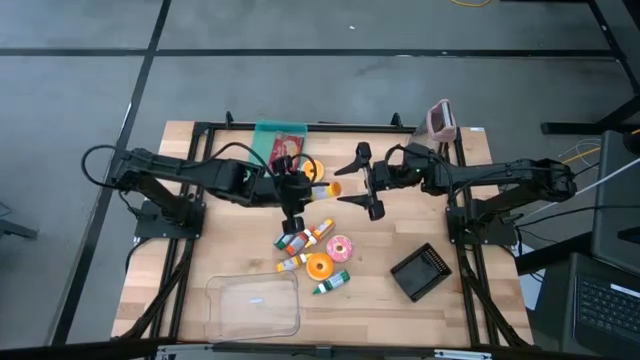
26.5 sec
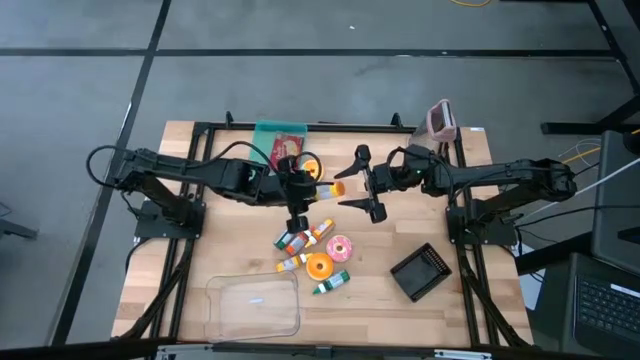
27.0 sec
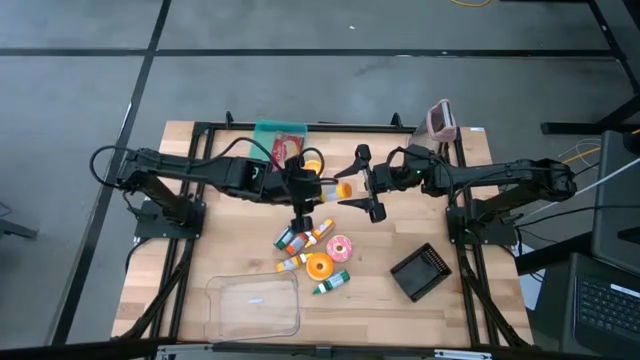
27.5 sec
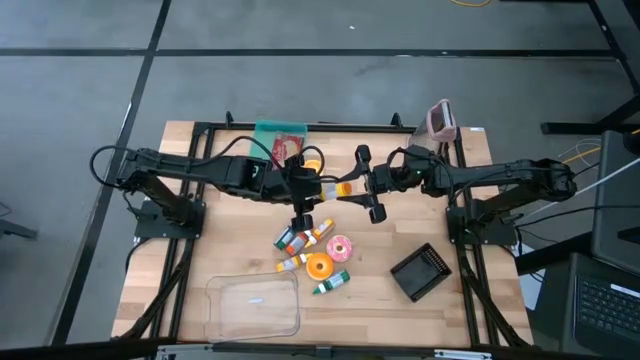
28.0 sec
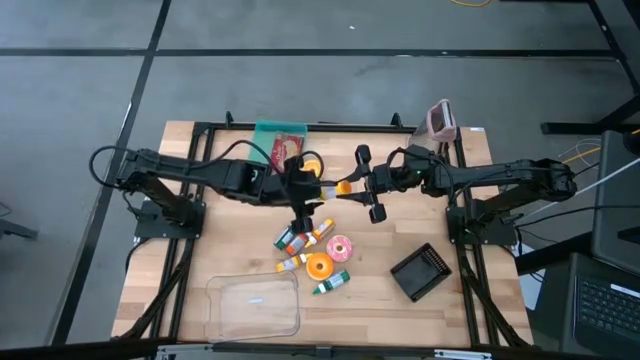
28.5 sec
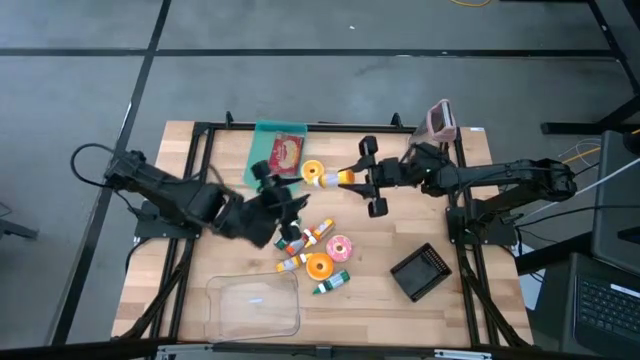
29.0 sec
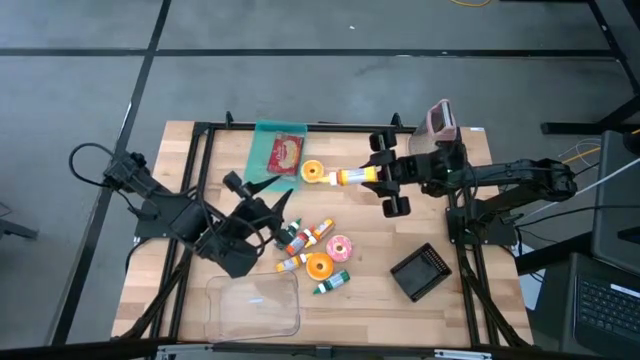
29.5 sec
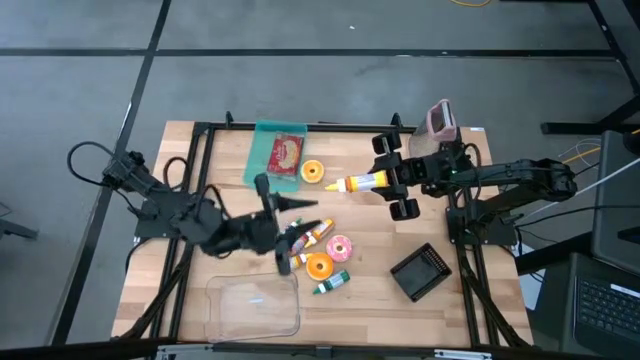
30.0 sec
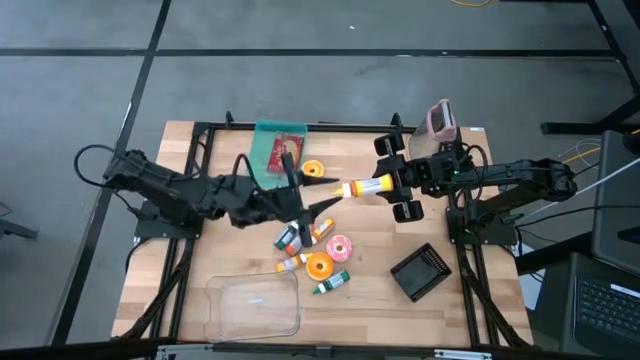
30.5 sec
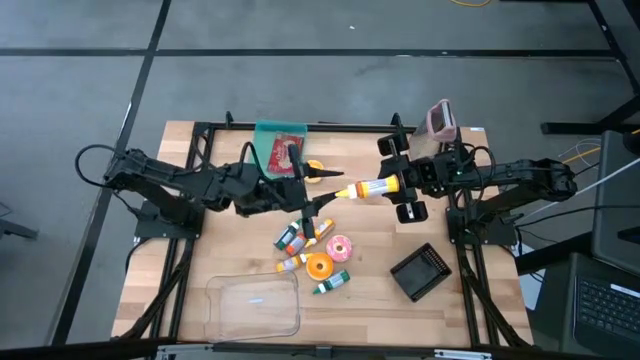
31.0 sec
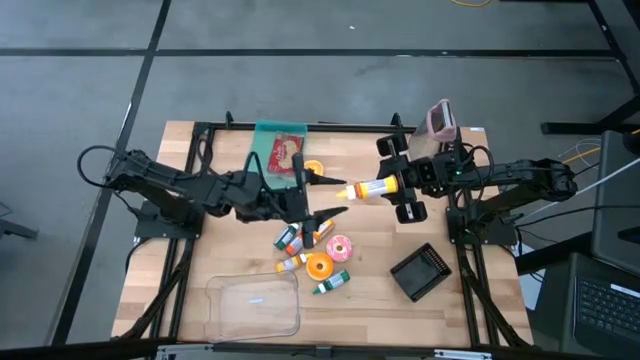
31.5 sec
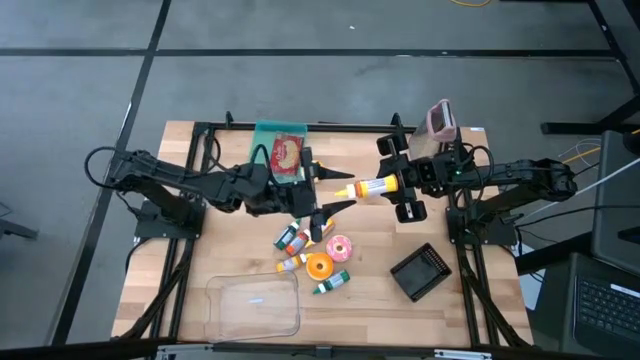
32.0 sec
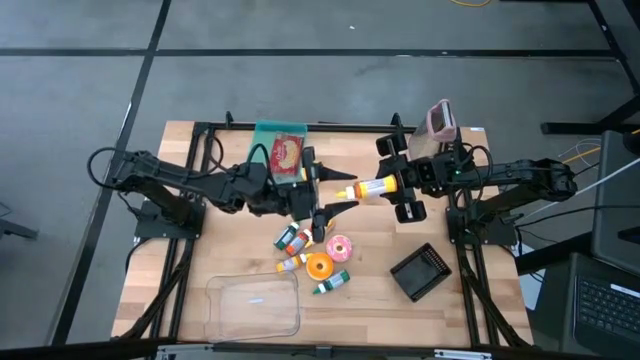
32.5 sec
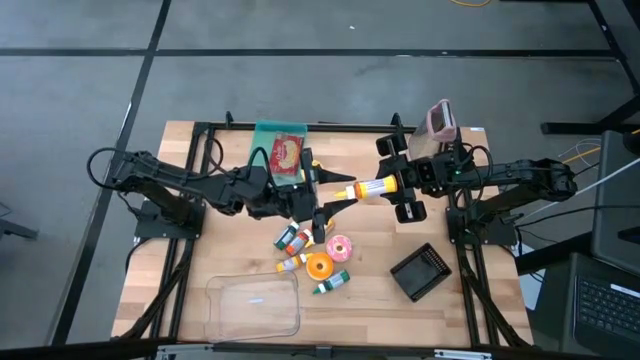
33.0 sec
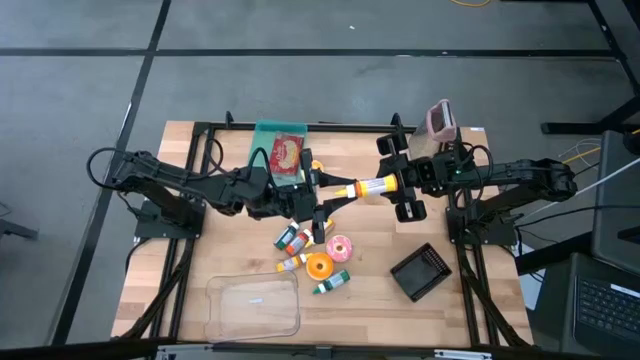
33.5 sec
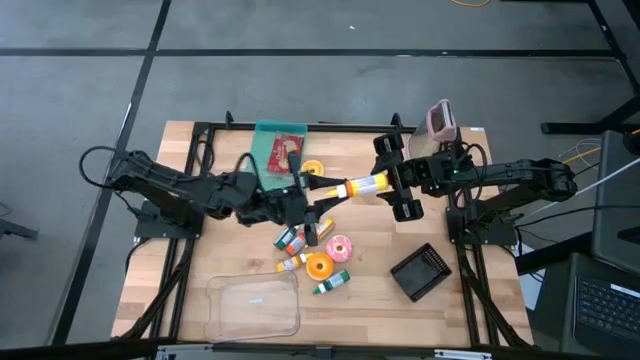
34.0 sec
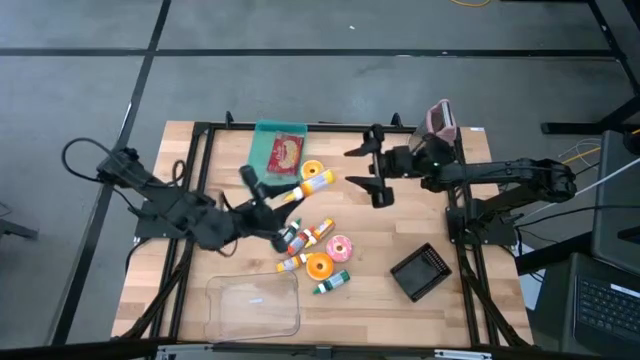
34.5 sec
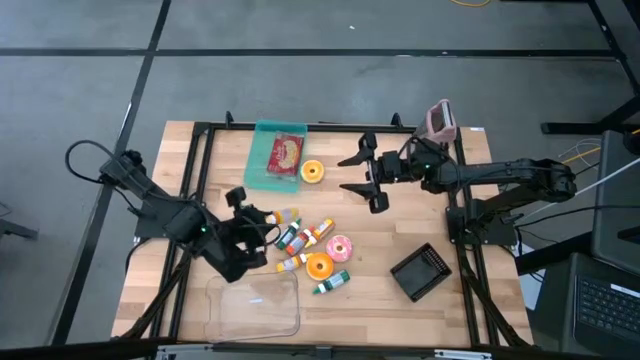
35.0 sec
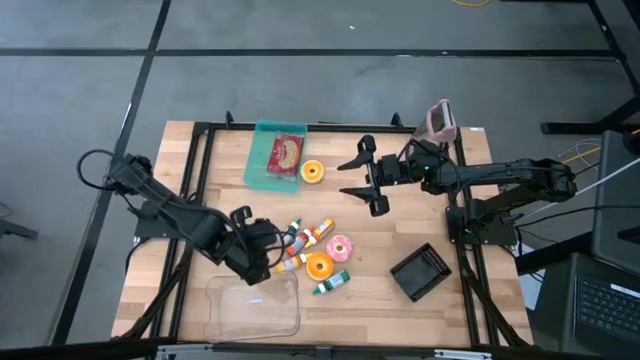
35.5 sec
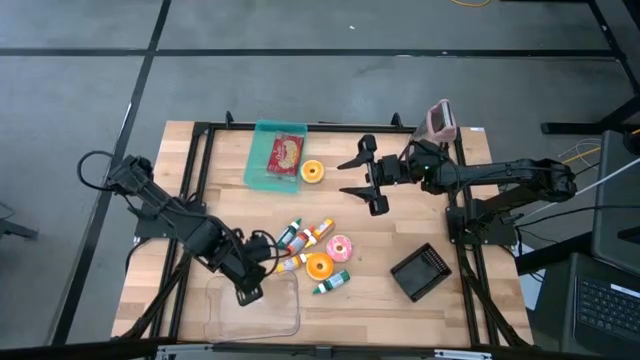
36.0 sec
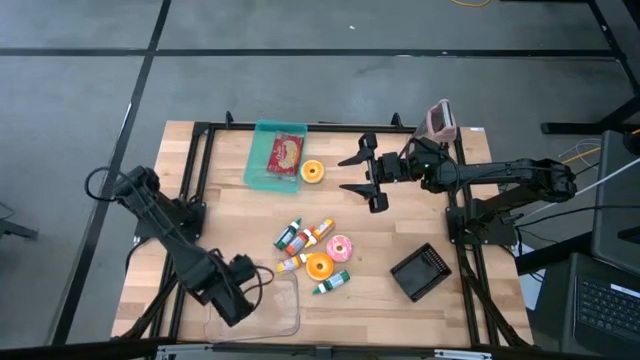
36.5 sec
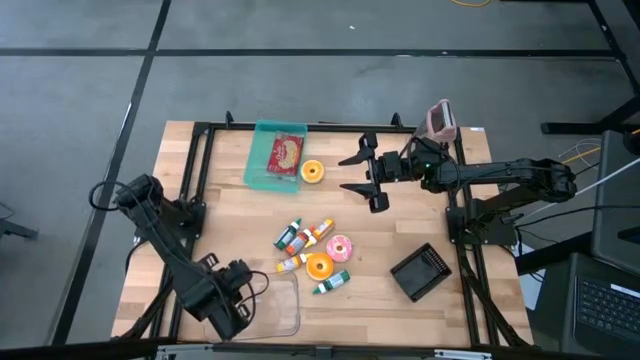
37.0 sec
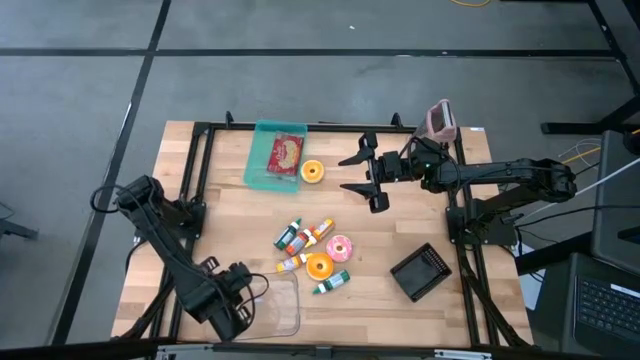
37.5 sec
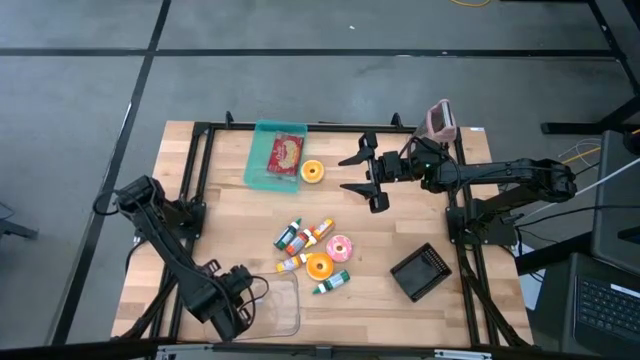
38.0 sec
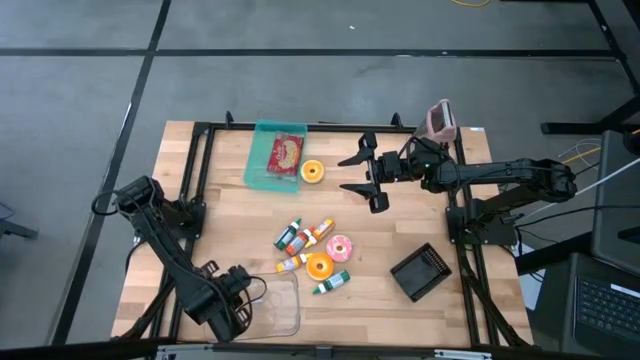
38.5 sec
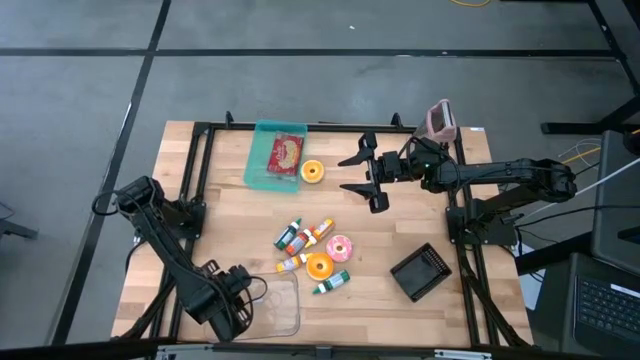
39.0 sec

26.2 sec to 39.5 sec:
Put the top left yellow food coloring bottle into the transparent bin

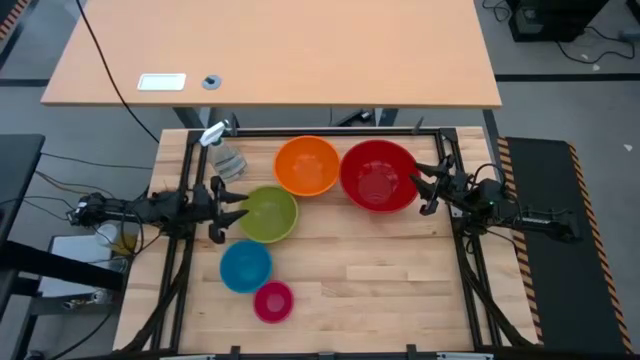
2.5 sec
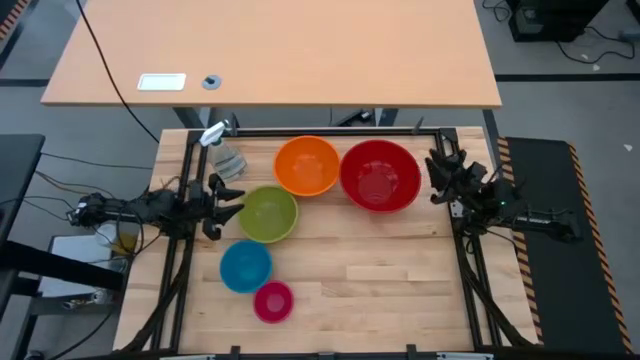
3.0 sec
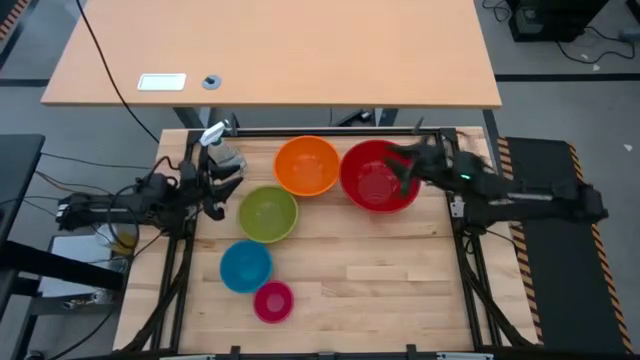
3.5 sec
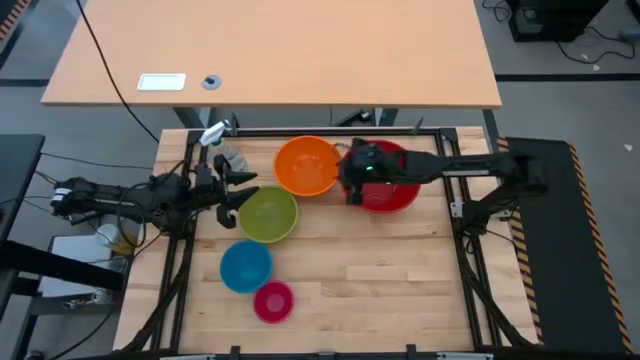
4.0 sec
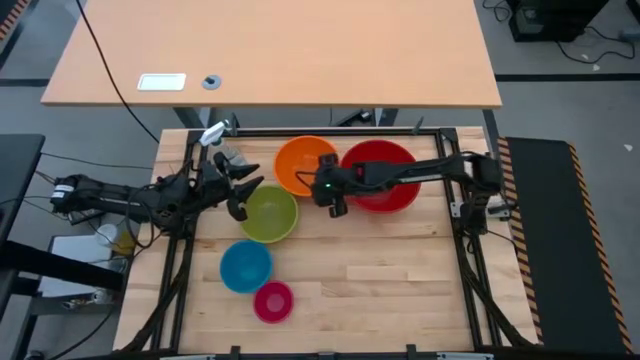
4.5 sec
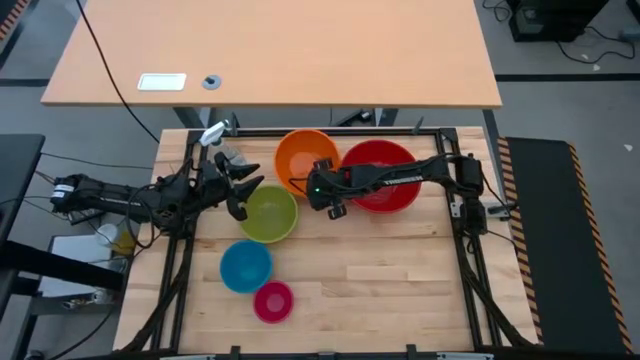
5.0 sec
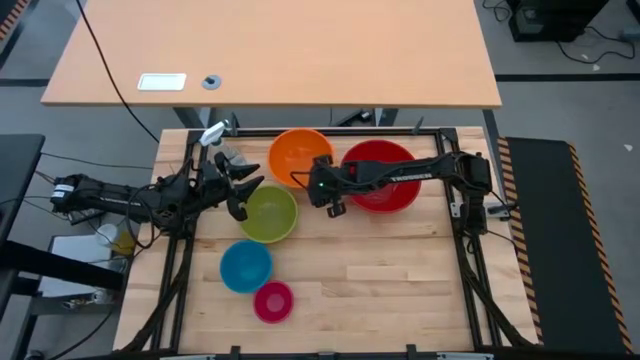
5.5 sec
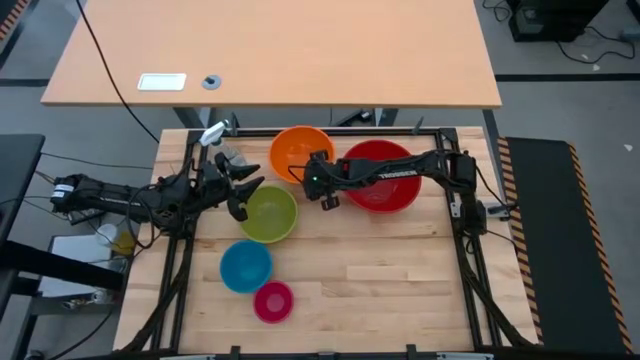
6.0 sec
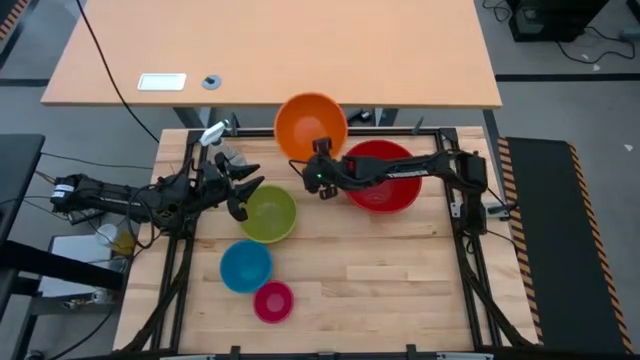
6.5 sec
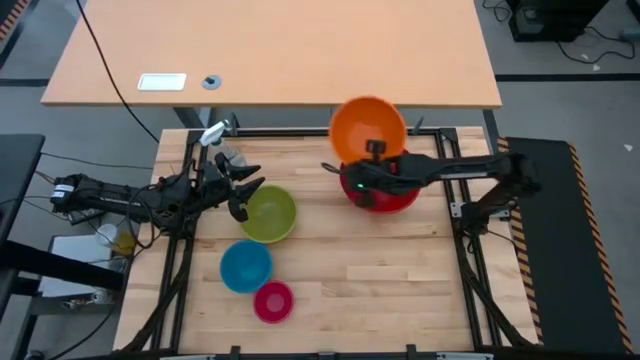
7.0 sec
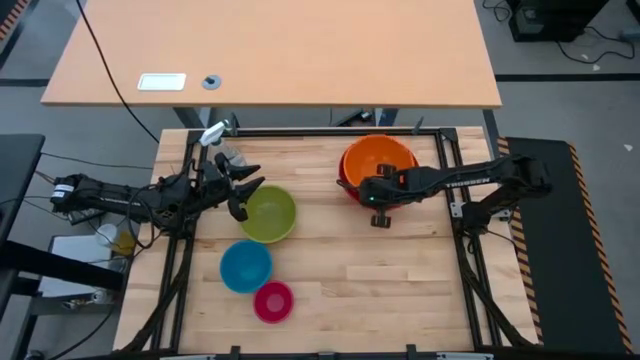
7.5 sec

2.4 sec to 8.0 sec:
Stack the orange bowl on top of the red bowl

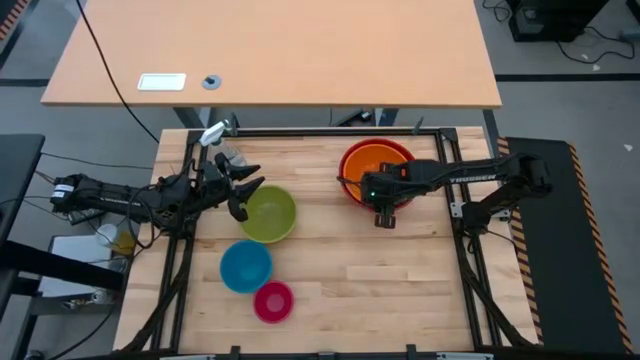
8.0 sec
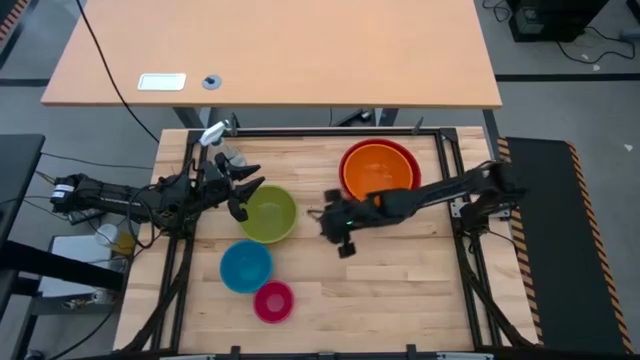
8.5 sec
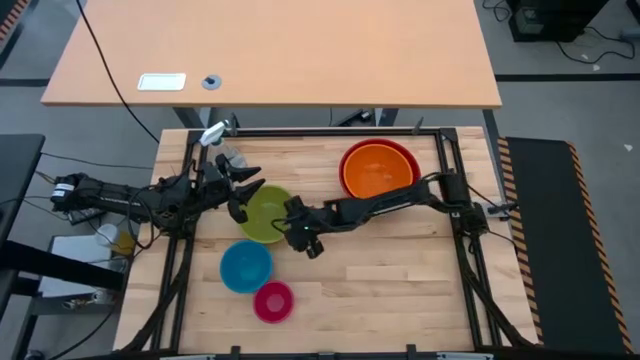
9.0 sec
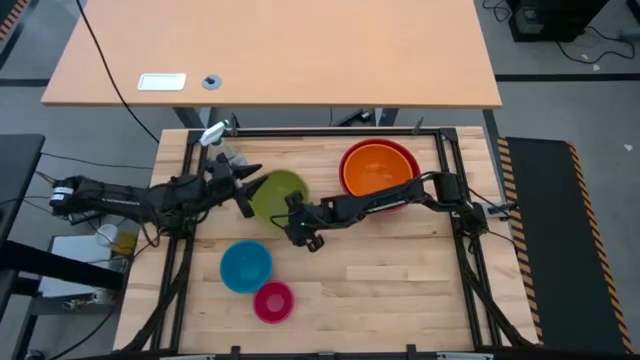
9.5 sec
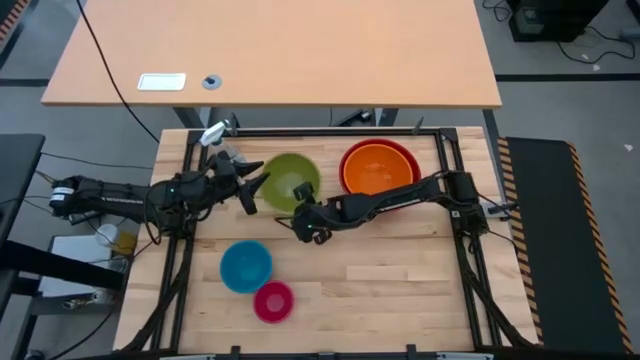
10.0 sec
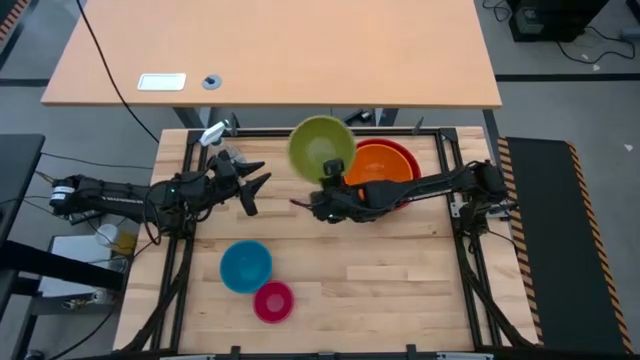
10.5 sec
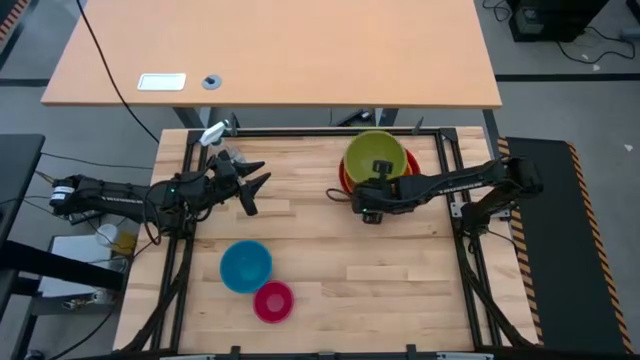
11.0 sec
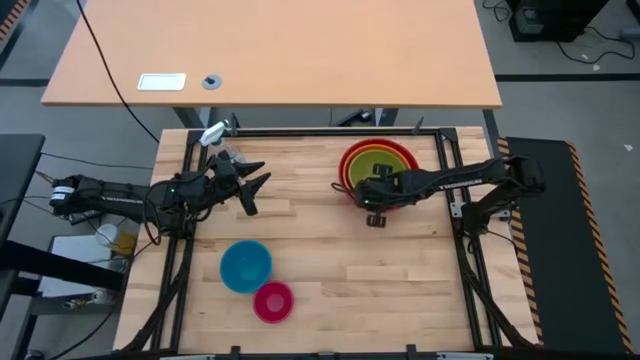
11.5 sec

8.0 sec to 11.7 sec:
Stack the green bowl on top of the orange bowl
